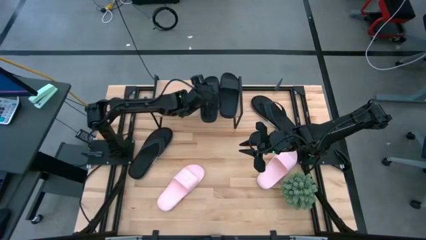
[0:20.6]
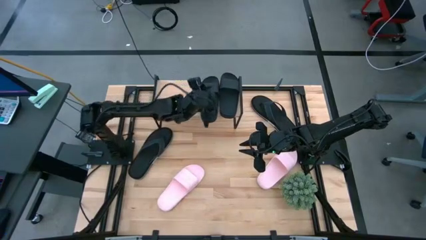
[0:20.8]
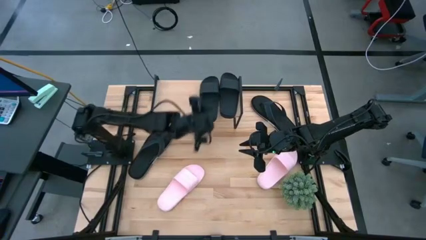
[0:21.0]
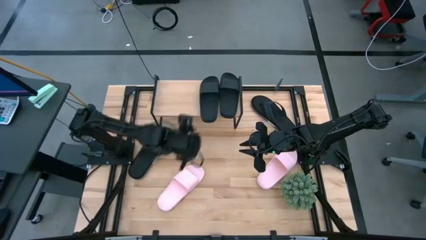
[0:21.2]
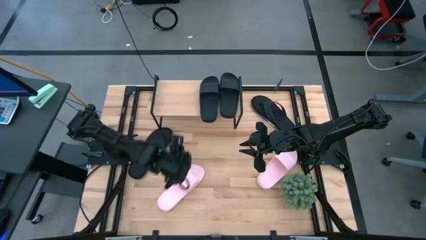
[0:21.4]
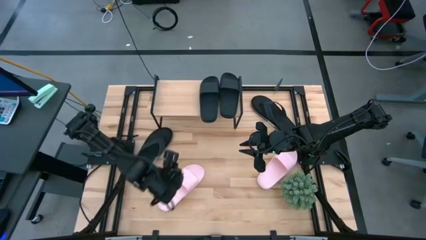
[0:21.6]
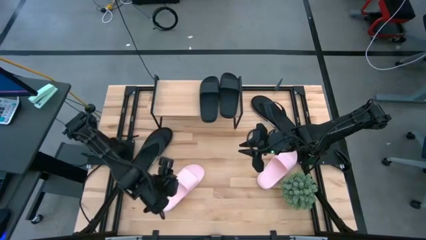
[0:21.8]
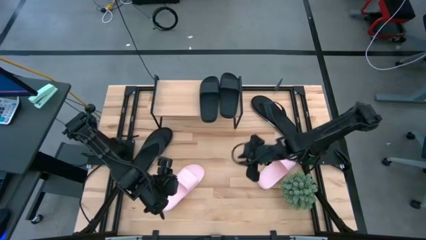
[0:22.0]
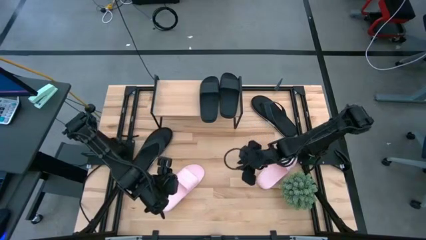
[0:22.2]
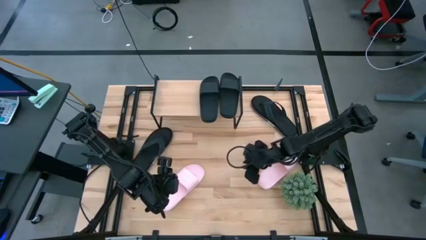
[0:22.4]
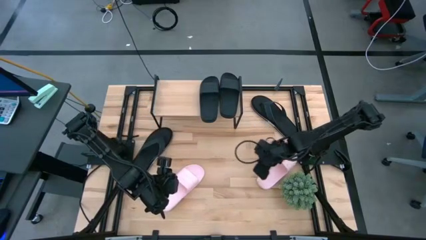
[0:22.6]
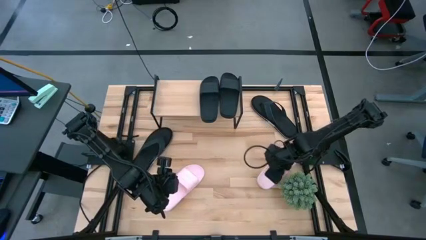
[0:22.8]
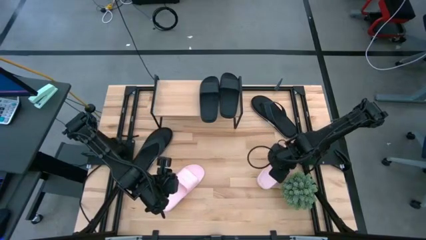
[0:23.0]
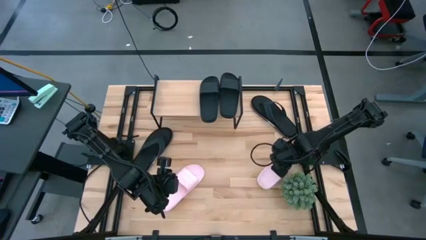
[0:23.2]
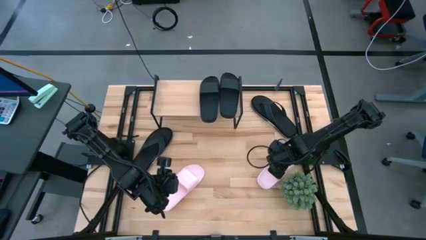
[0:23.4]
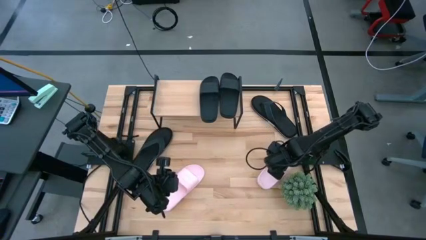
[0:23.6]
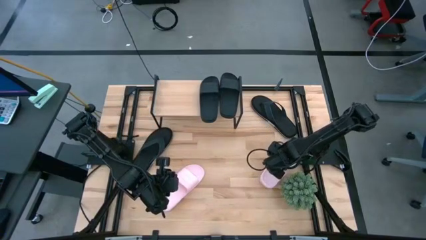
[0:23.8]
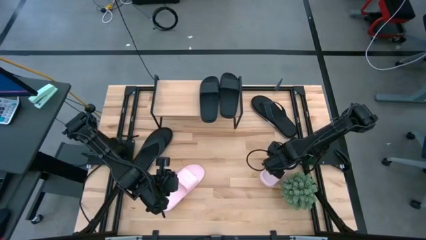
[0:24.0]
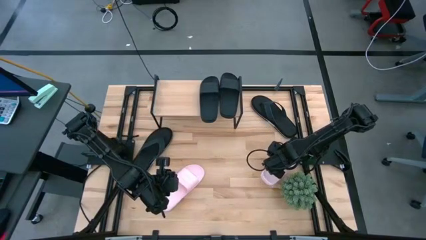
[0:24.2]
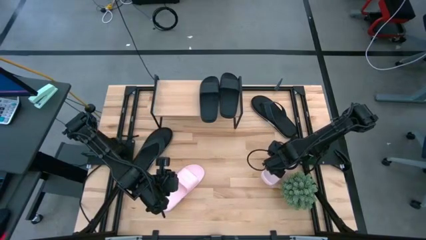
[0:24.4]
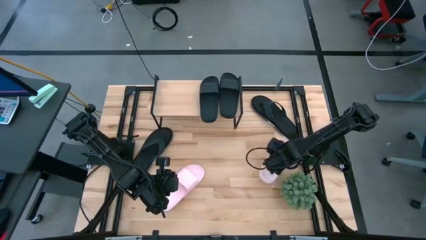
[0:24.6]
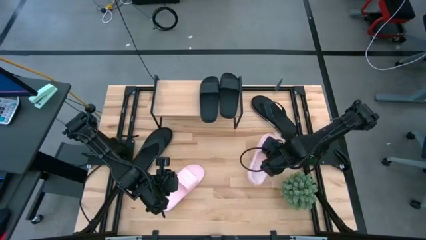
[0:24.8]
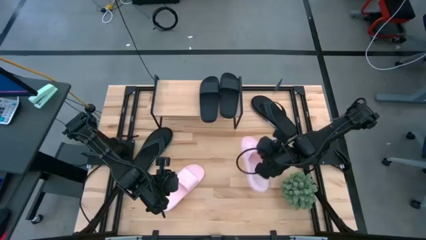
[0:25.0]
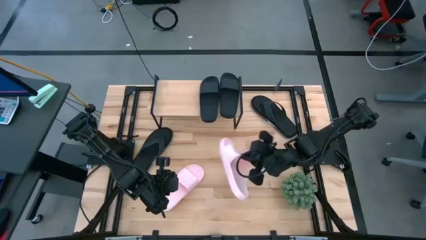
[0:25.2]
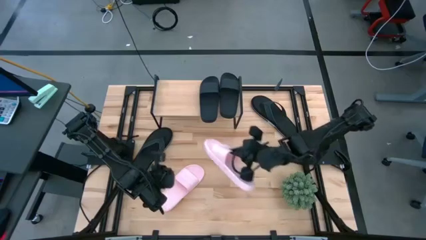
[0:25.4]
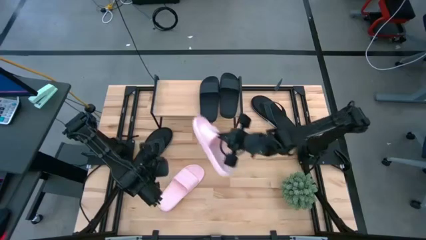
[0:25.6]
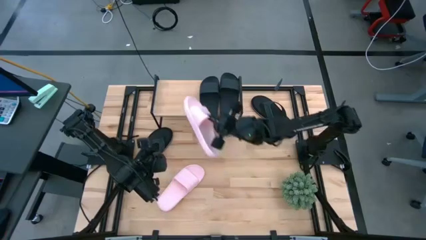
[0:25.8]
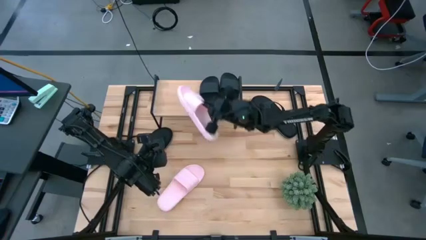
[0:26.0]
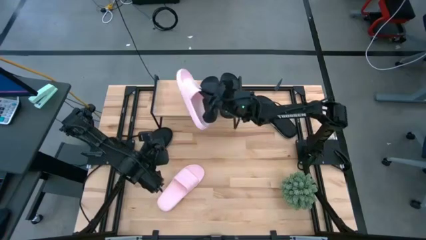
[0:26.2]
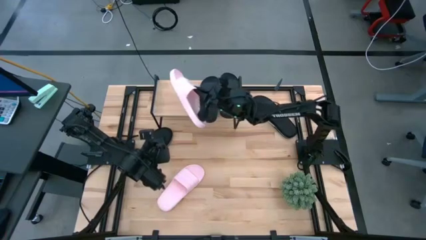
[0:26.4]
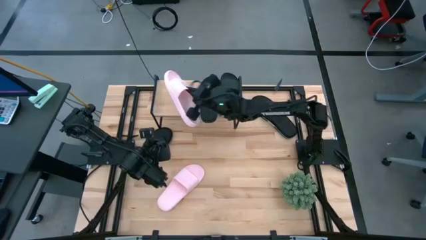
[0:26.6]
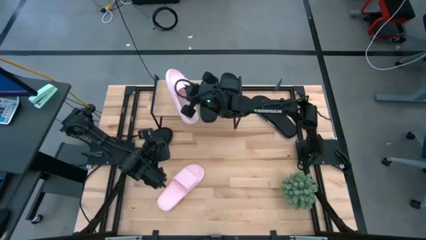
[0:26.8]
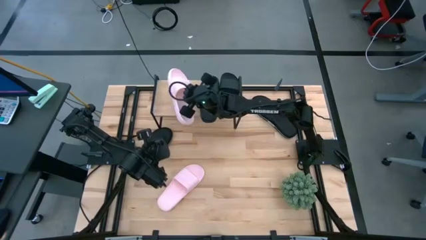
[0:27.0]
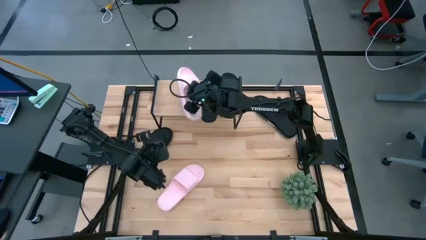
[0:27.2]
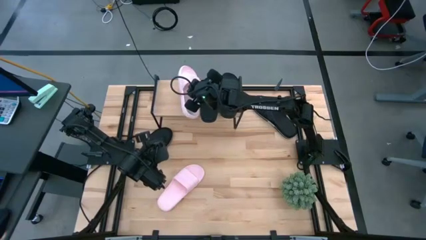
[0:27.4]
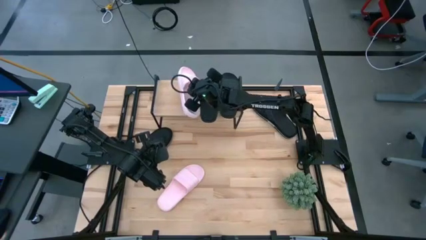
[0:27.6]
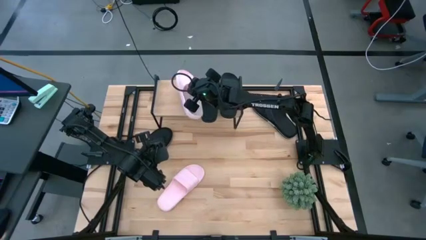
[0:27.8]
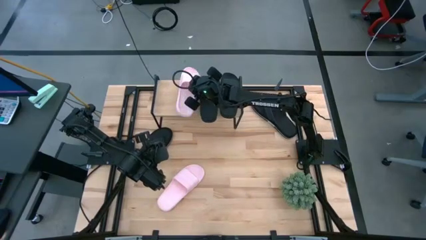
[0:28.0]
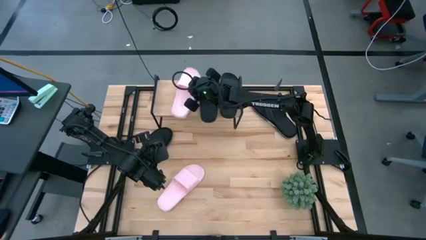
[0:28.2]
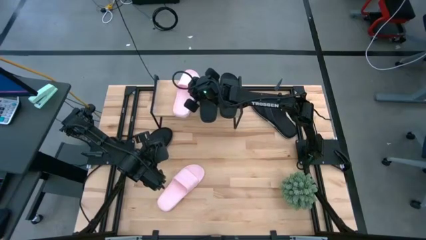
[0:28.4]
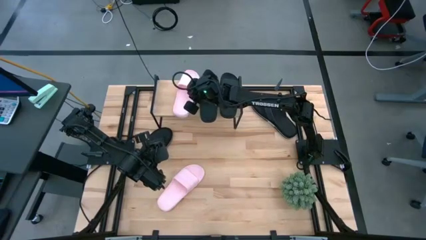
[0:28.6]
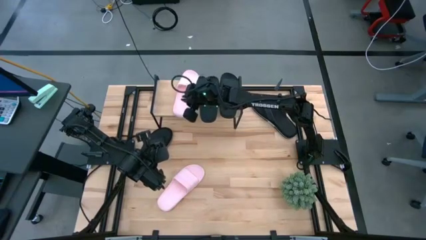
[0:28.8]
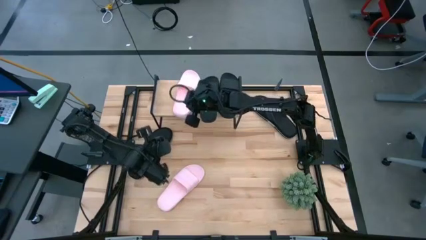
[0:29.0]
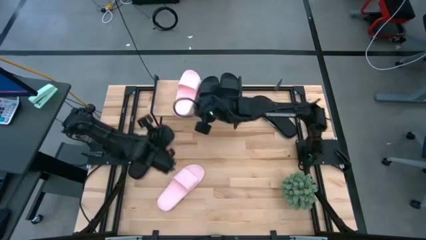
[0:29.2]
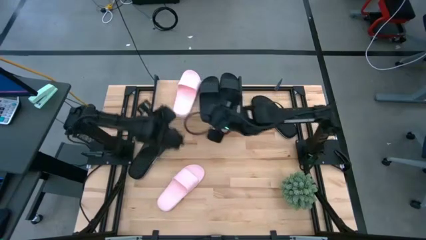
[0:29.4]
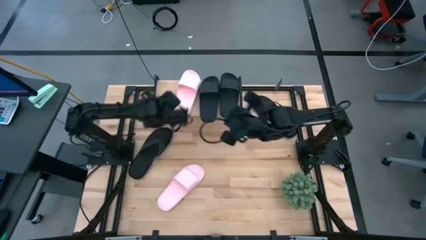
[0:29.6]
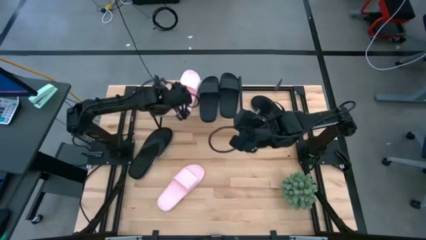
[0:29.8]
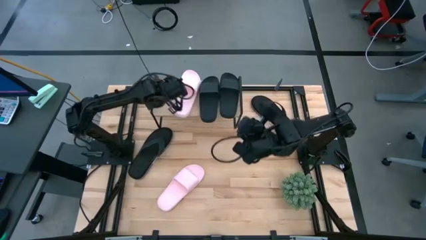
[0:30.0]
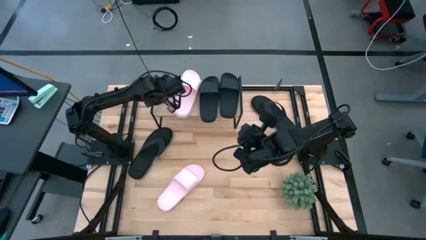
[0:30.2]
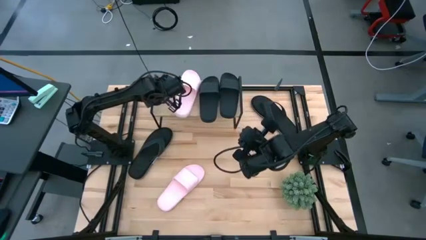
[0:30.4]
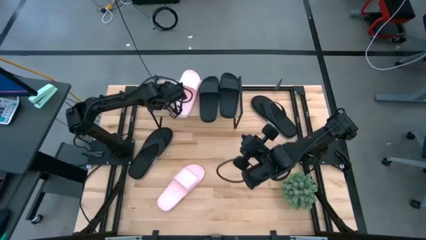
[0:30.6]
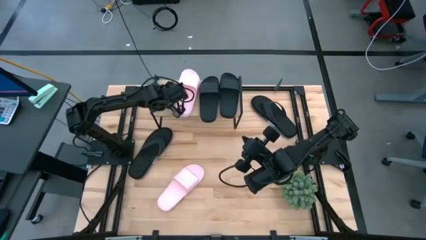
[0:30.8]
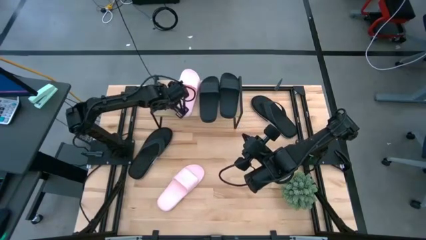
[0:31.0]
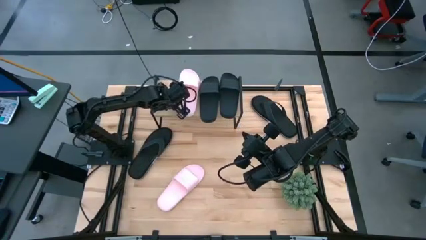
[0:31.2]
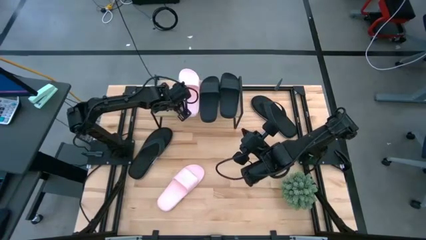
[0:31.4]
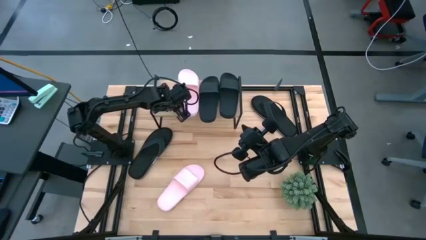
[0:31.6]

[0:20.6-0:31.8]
Task: Pick and place slides into the shelf
Put the right pink slide on the shelf

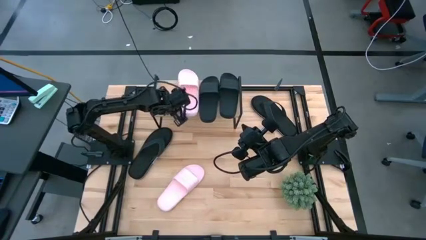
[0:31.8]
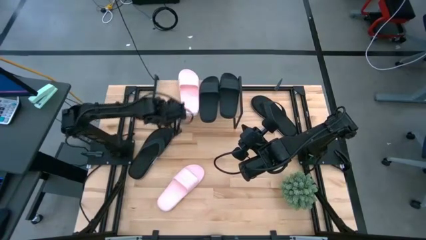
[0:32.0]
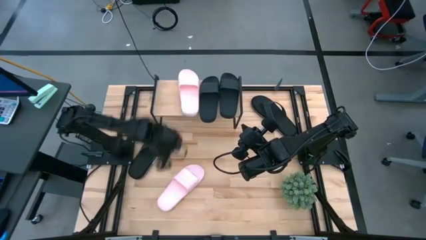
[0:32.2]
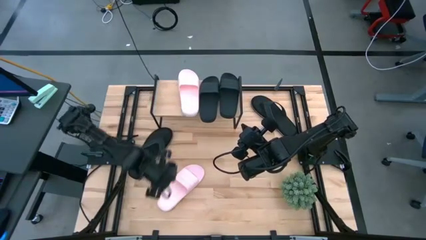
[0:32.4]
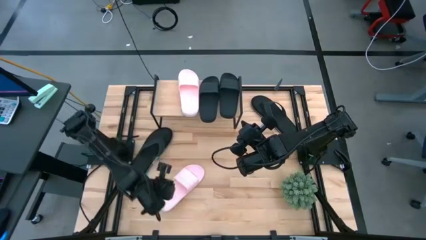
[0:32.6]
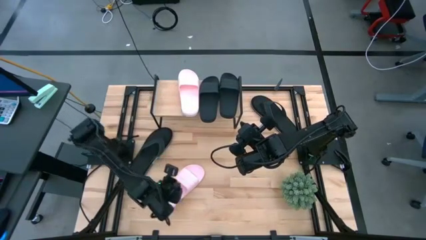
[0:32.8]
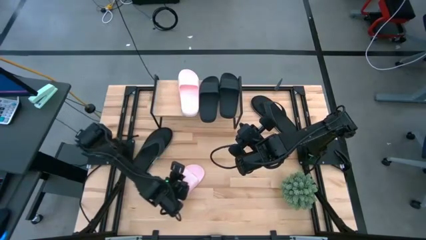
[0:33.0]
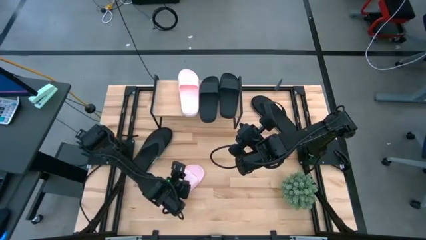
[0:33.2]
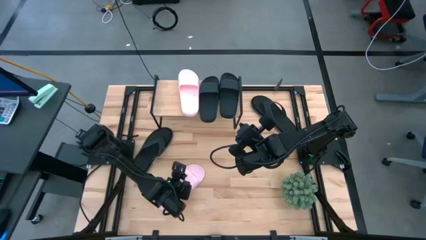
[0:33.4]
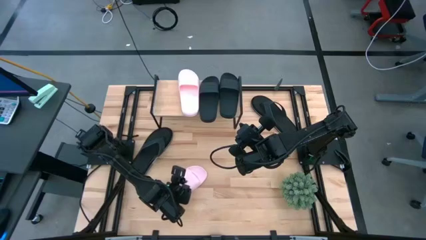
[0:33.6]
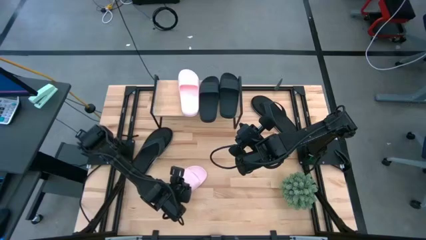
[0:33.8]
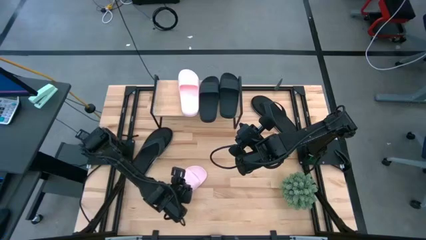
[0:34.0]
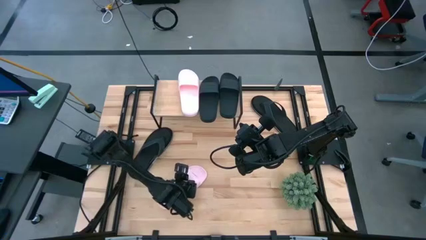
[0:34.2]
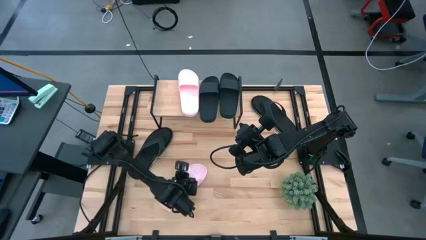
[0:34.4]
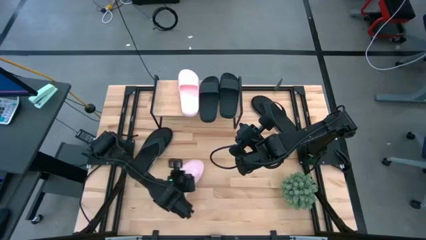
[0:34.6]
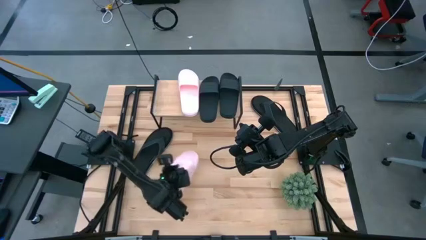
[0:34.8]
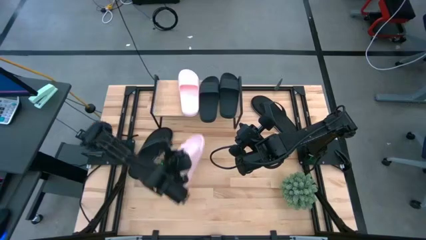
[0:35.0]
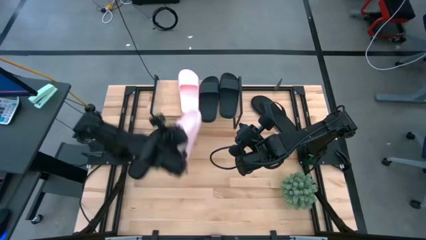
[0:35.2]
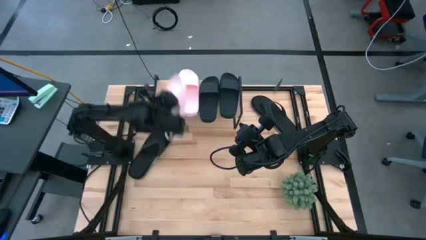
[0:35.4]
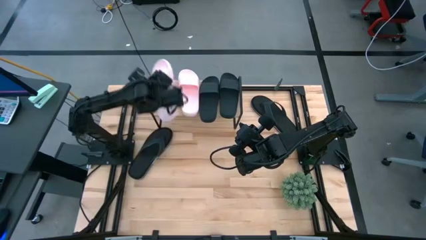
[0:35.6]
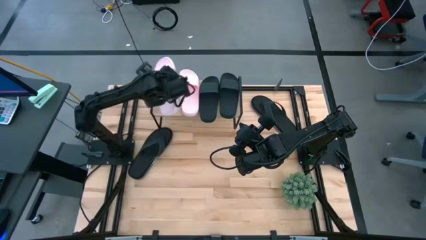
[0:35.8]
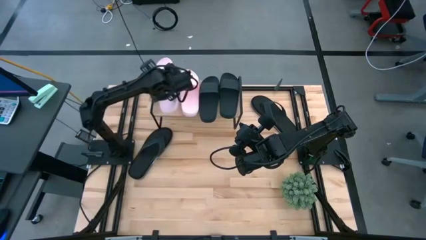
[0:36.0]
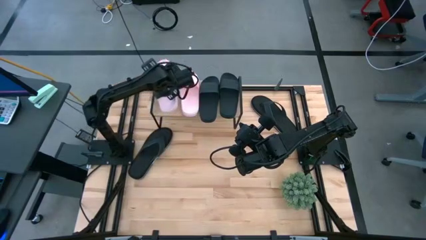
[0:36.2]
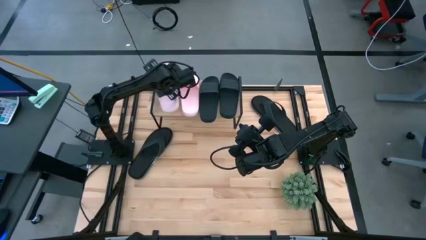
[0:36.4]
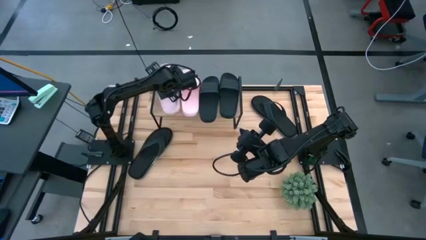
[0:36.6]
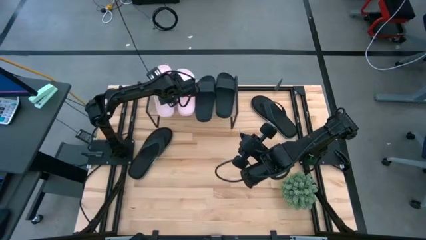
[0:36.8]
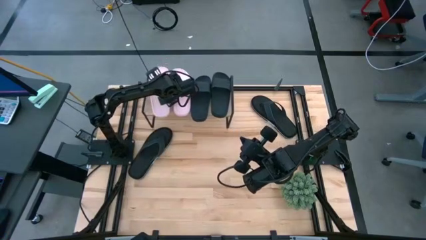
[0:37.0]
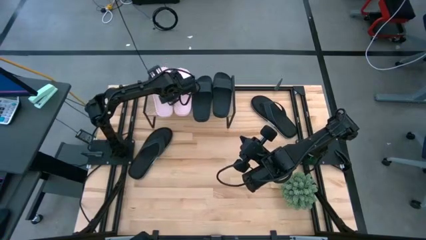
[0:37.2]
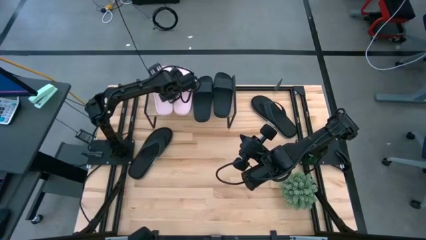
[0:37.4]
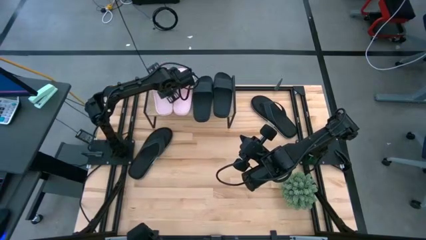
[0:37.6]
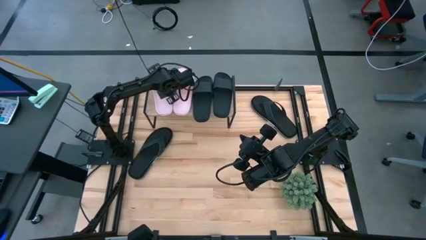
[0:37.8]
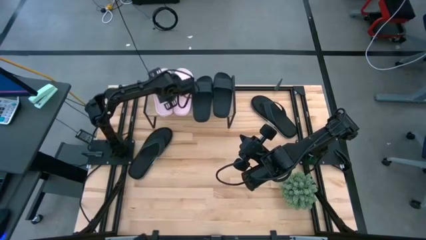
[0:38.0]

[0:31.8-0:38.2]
Put the pink slide on the shelf
